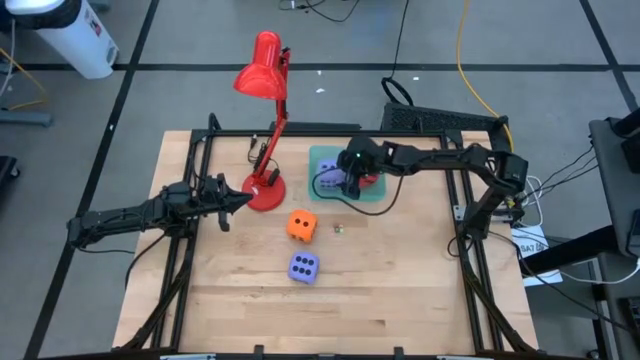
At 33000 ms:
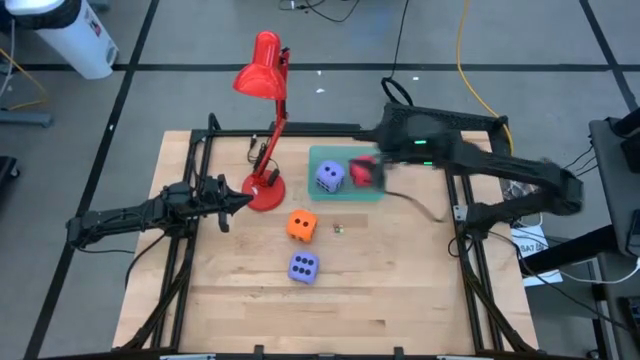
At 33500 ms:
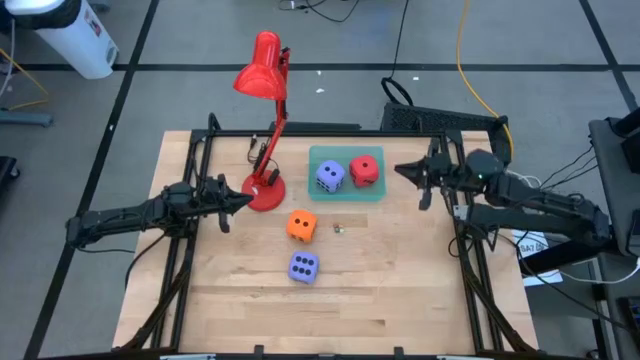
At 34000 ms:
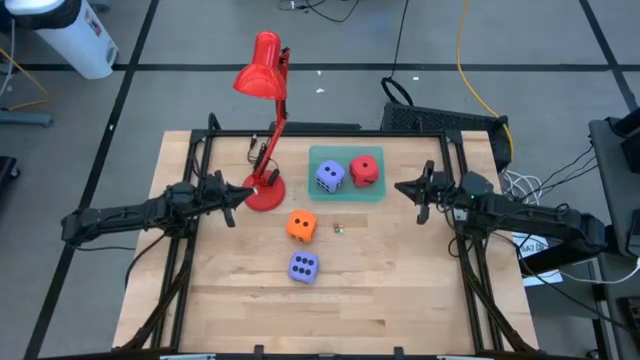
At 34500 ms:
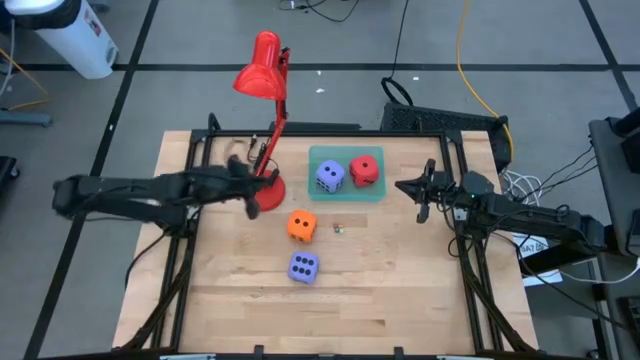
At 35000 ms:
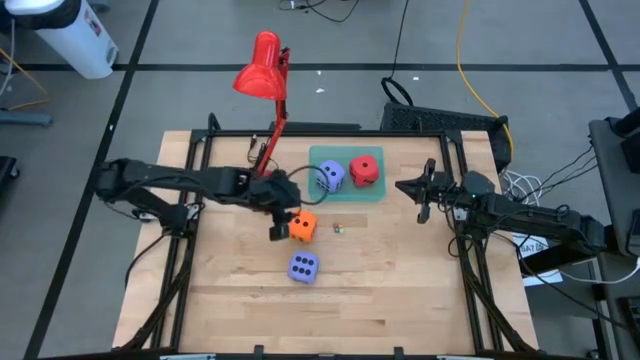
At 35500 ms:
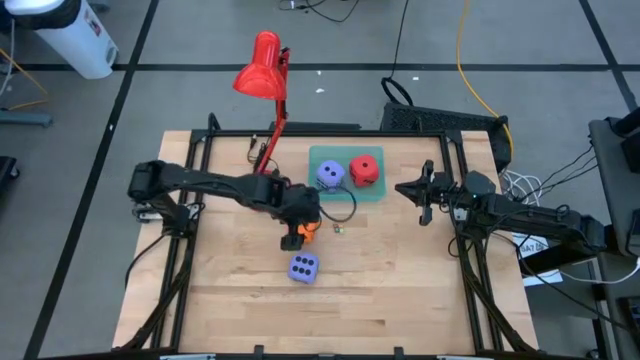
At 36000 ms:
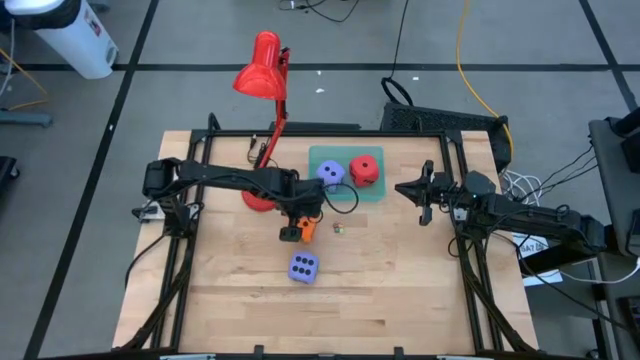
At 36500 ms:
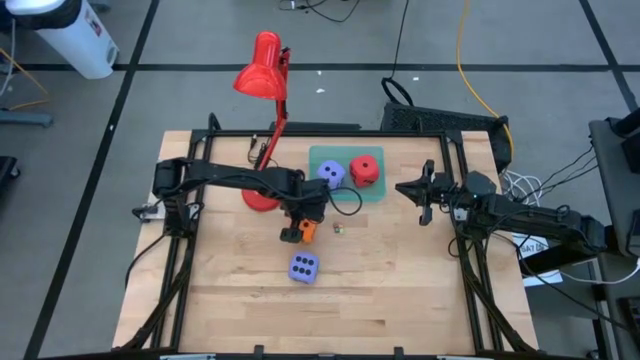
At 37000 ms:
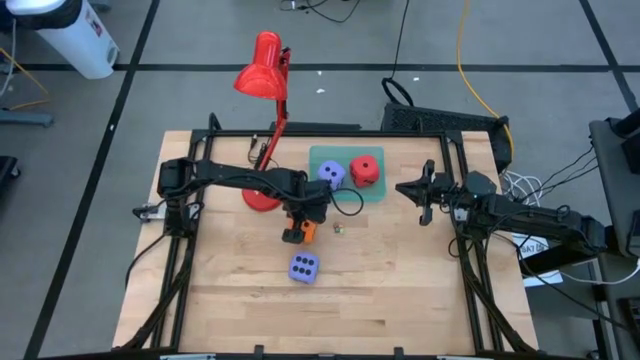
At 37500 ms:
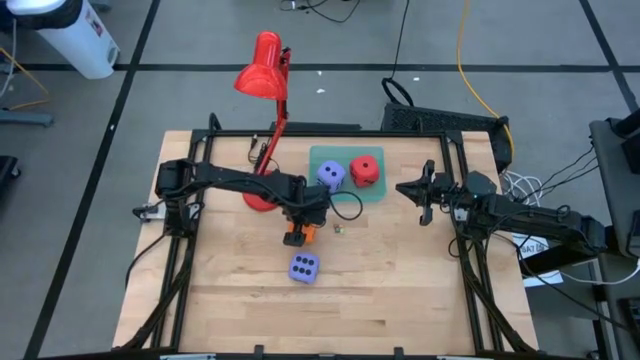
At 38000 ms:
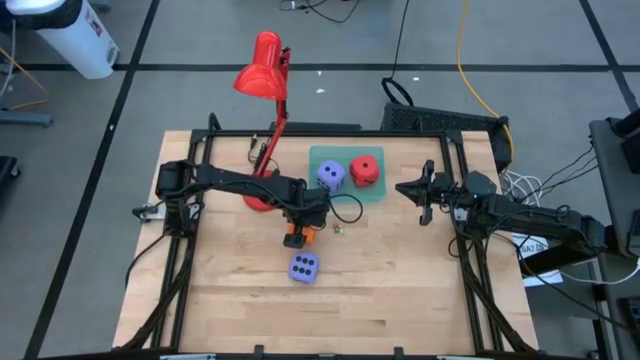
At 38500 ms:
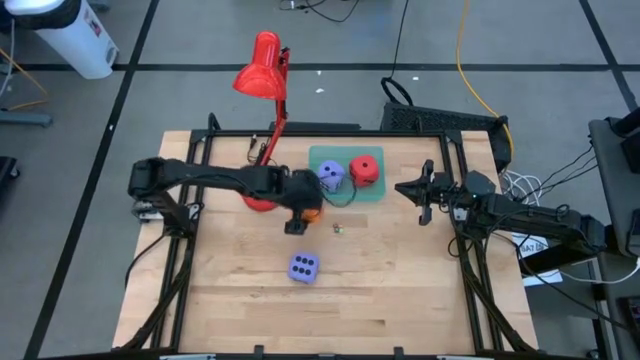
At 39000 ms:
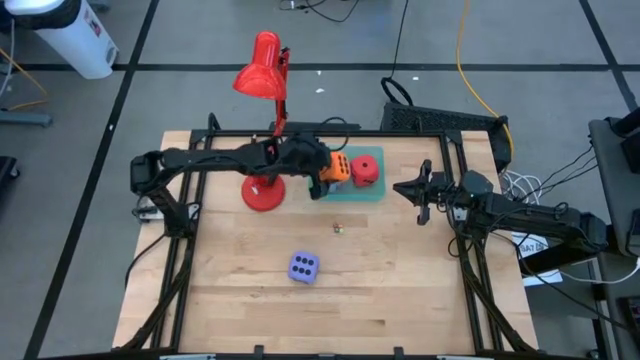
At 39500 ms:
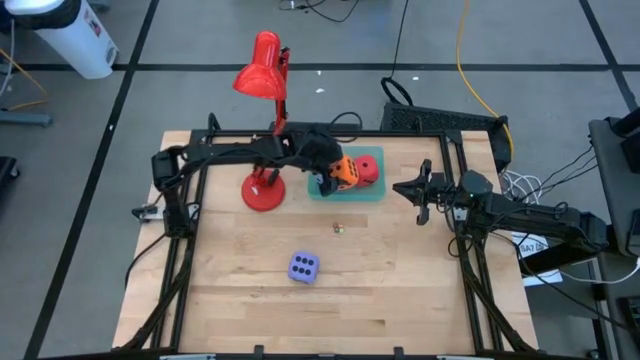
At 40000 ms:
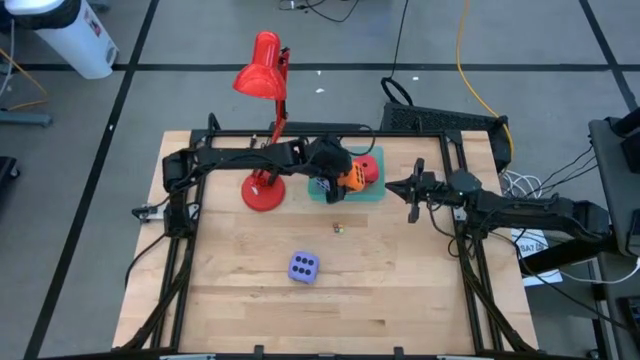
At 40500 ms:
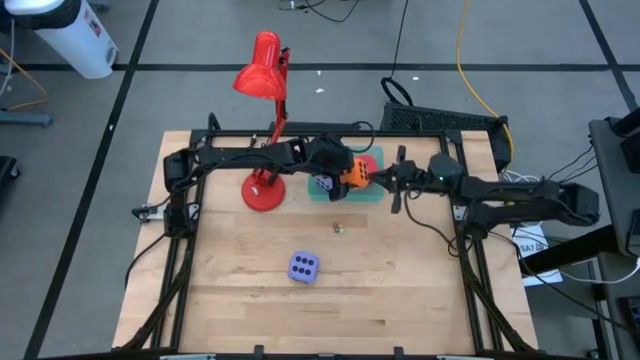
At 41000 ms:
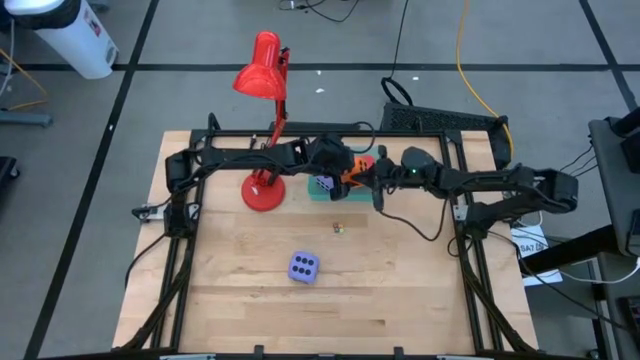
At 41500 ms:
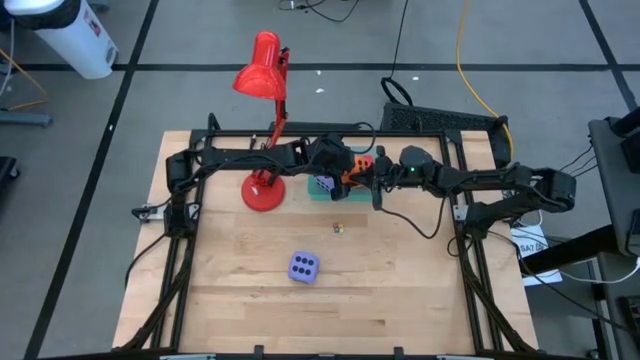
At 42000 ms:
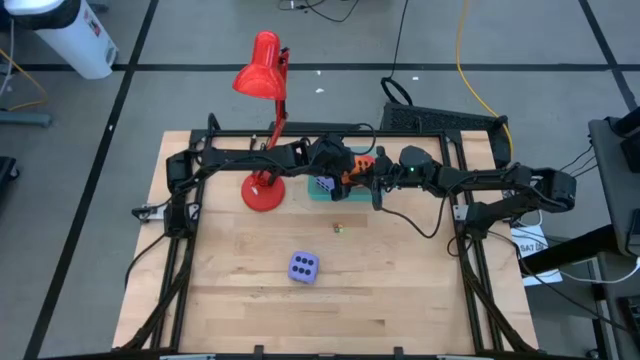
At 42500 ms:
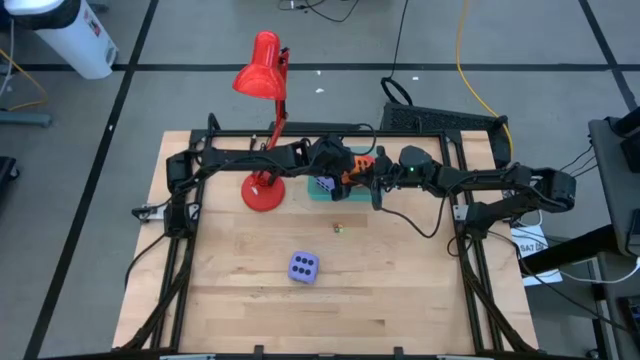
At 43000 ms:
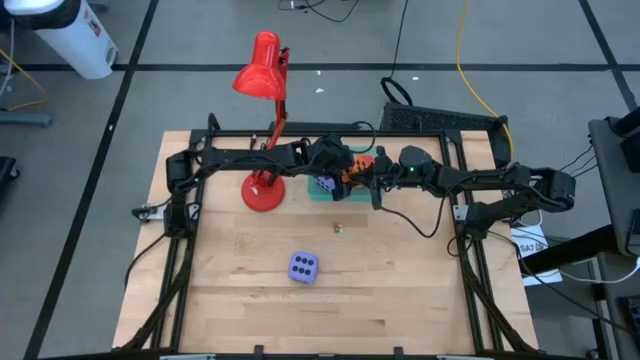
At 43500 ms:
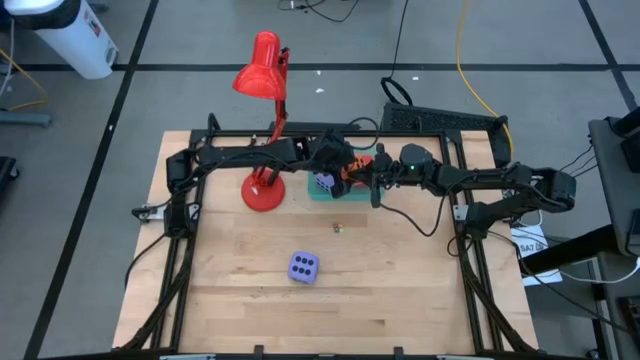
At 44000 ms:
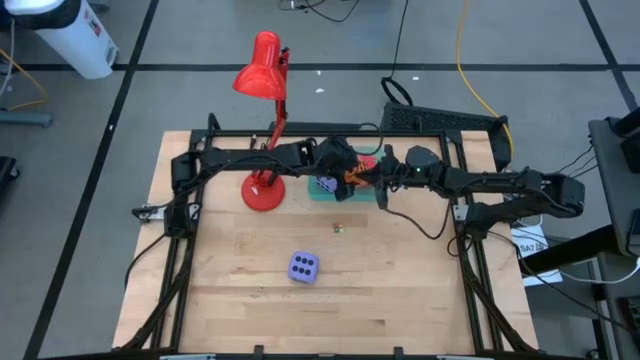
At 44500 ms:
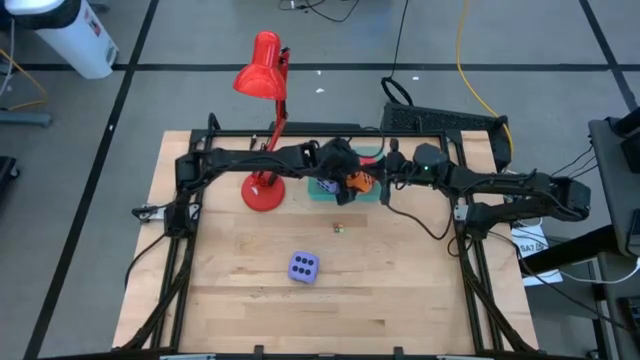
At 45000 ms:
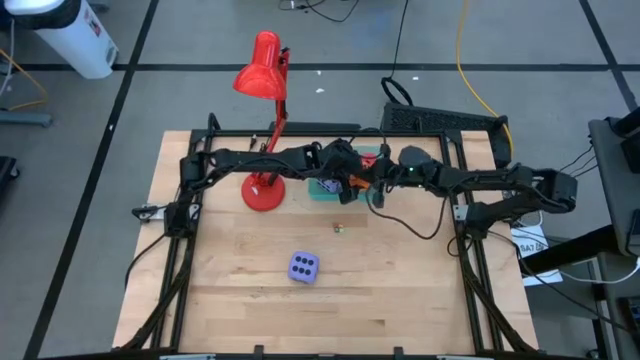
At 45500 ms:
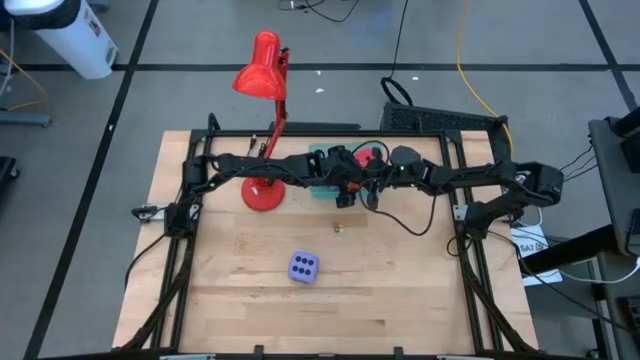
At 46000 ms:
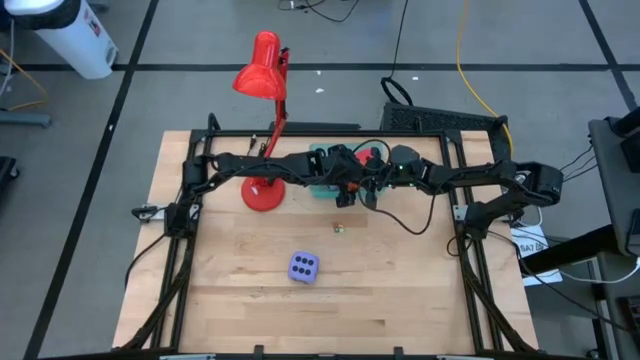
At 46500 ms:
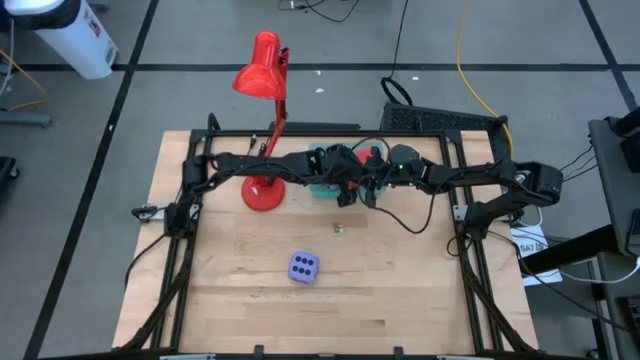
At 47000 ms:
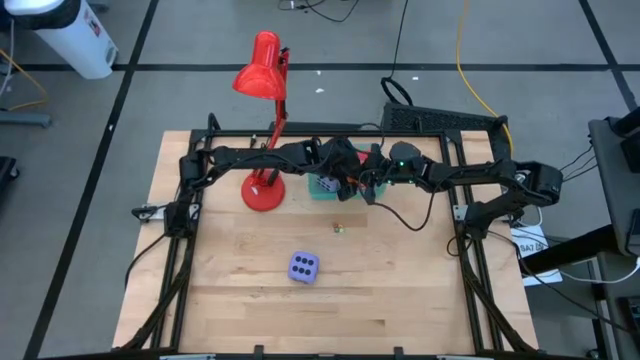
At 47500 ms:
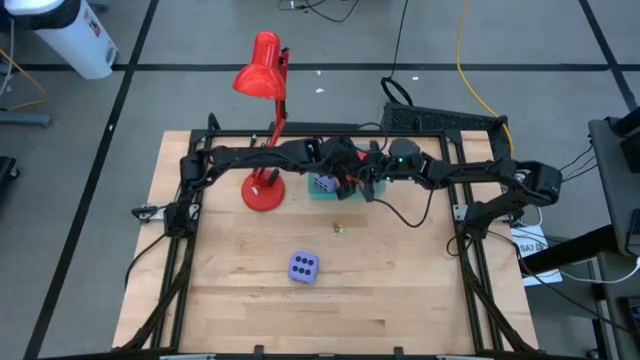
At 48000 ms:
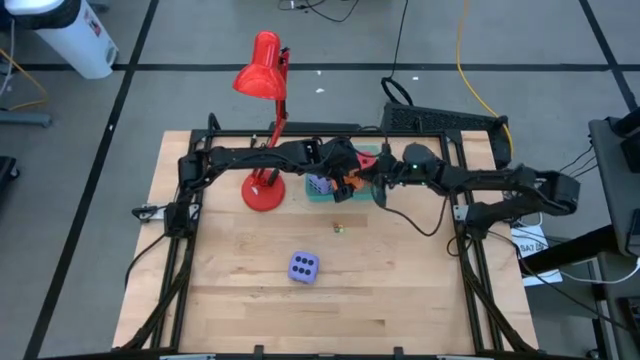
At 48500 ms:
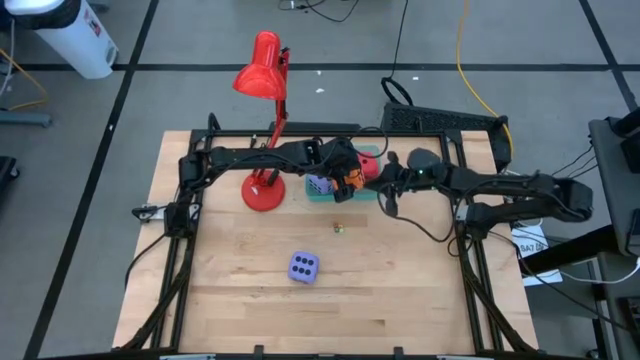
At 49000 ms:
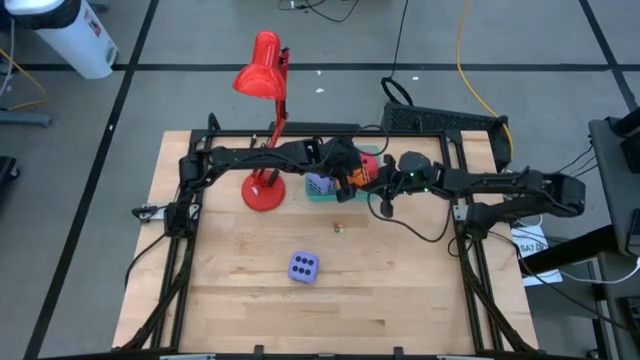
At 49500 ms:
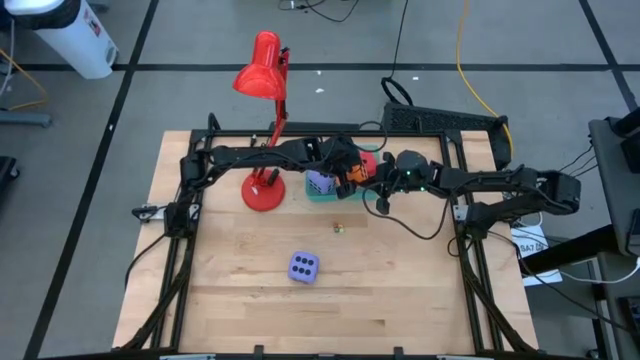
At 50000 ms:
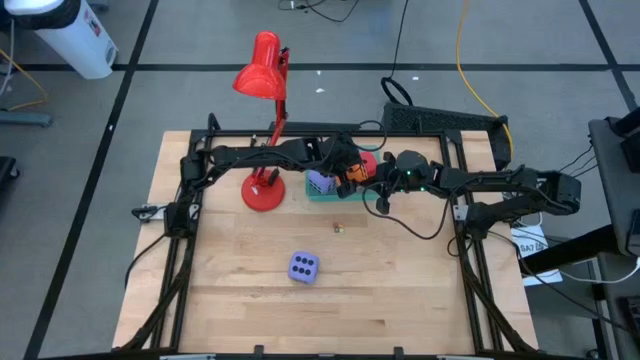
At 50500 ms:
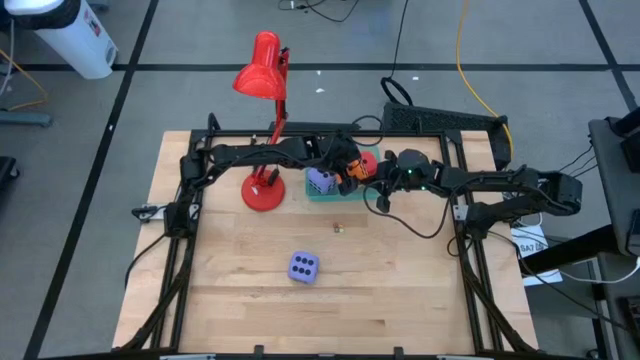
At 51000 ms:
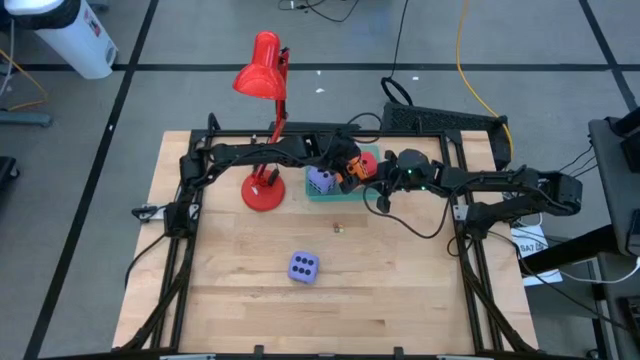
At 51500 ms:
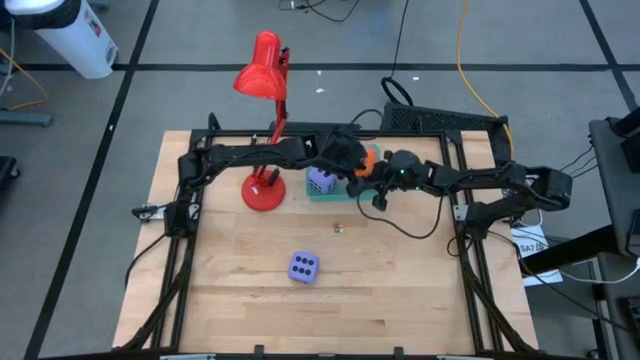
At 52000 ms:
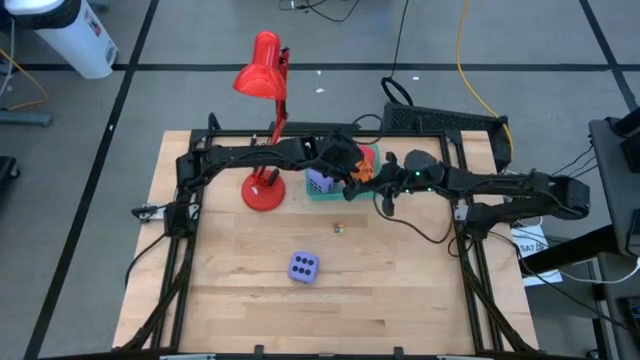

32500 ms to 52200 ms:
Task: Pick & Place Dice
Put the large orange die into the green bin
